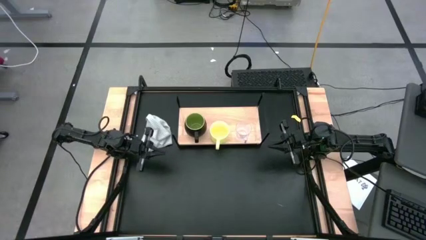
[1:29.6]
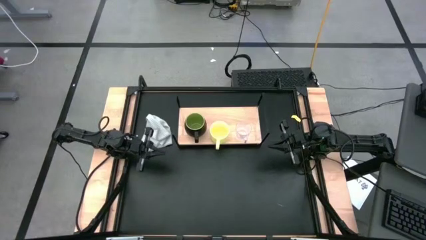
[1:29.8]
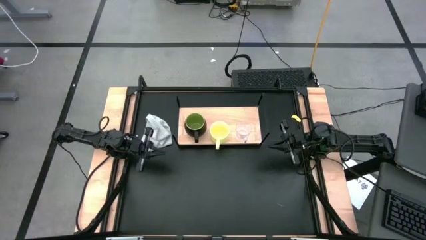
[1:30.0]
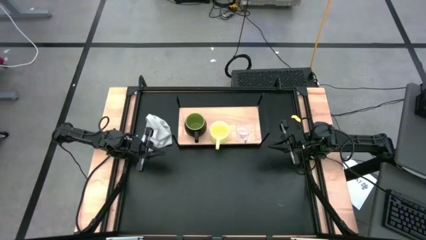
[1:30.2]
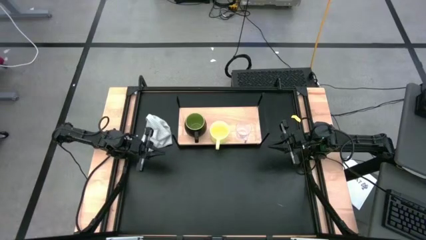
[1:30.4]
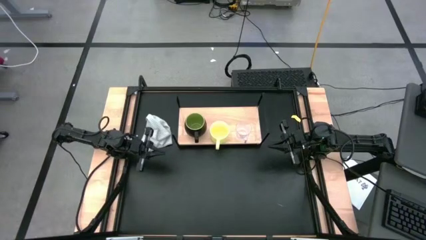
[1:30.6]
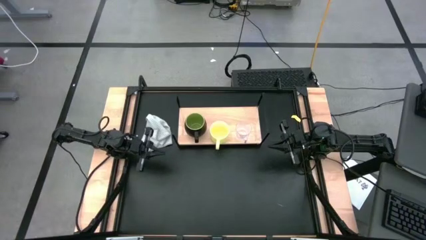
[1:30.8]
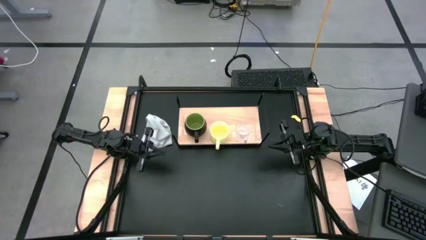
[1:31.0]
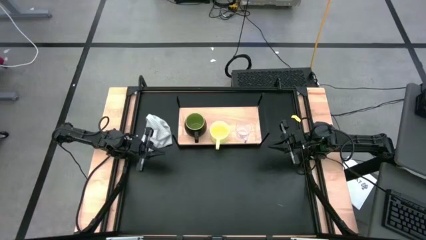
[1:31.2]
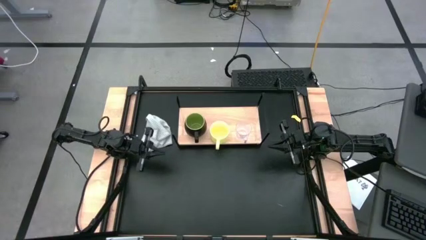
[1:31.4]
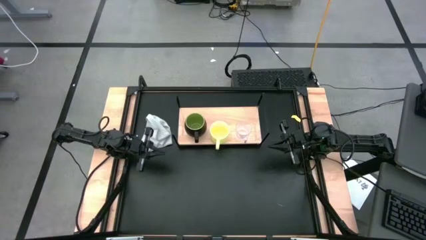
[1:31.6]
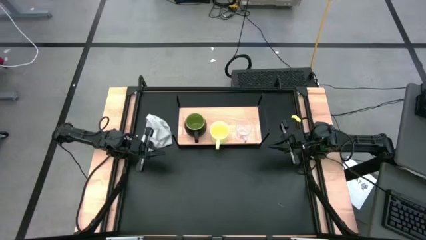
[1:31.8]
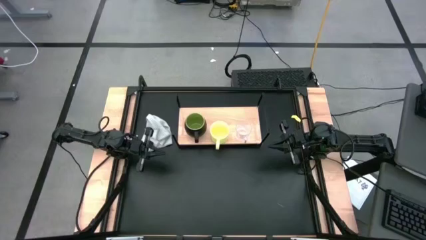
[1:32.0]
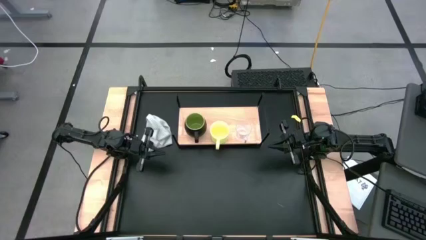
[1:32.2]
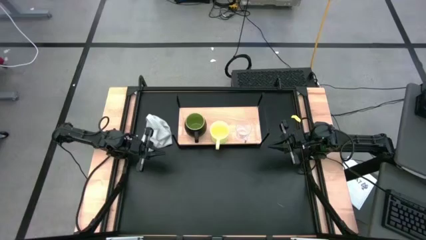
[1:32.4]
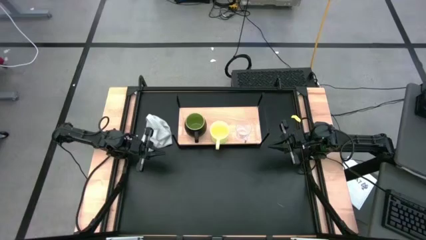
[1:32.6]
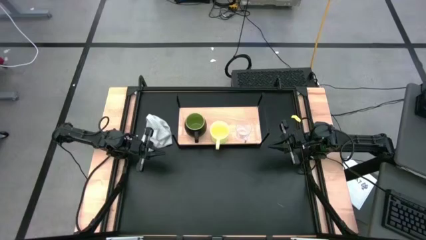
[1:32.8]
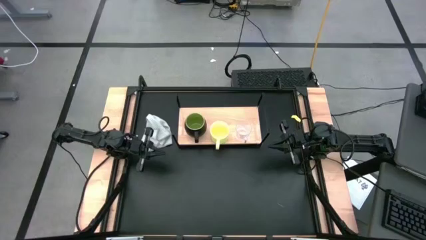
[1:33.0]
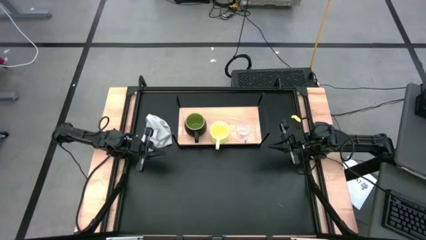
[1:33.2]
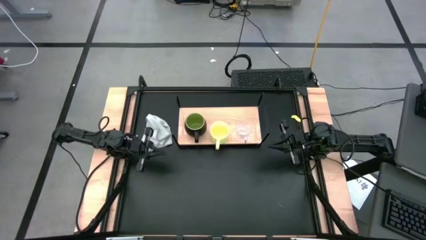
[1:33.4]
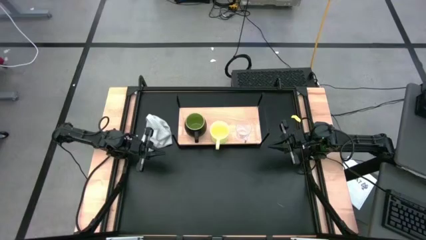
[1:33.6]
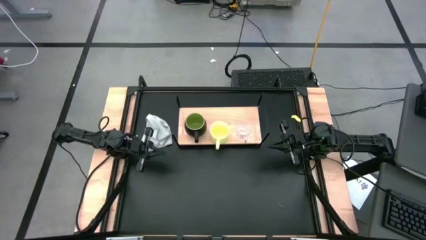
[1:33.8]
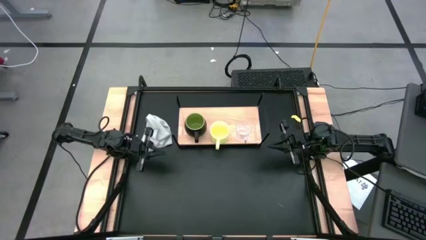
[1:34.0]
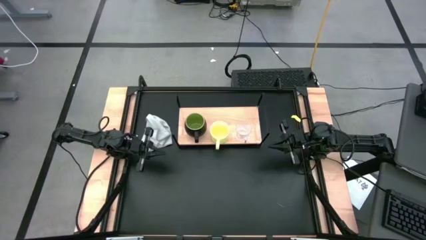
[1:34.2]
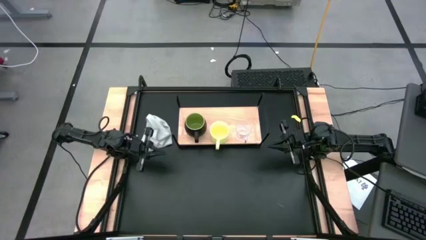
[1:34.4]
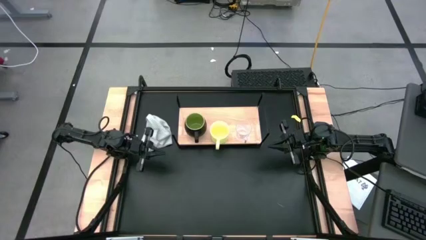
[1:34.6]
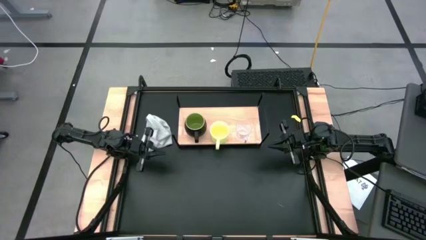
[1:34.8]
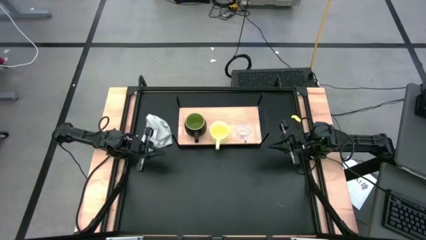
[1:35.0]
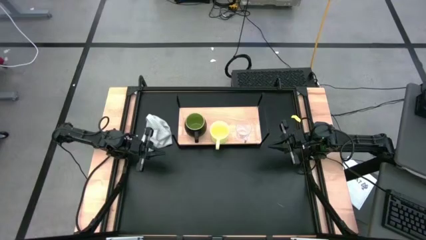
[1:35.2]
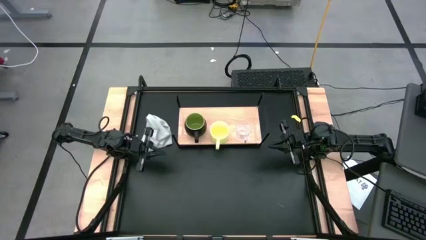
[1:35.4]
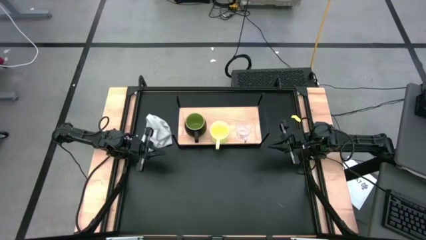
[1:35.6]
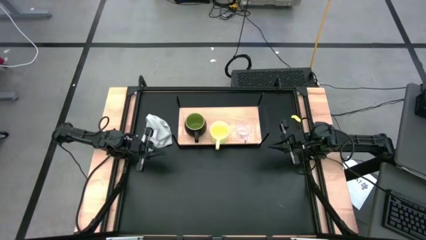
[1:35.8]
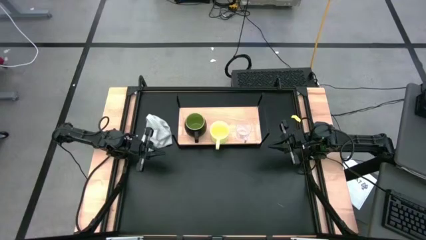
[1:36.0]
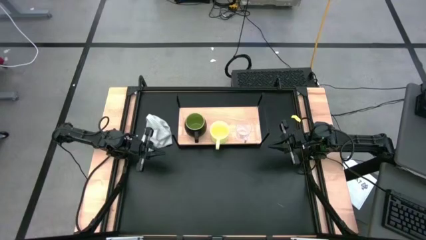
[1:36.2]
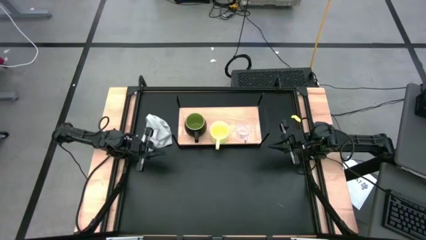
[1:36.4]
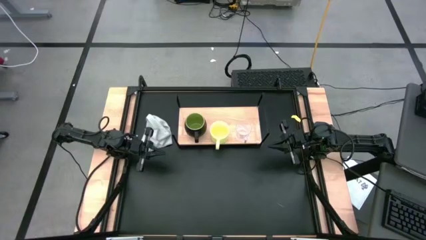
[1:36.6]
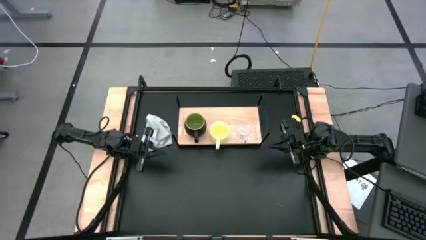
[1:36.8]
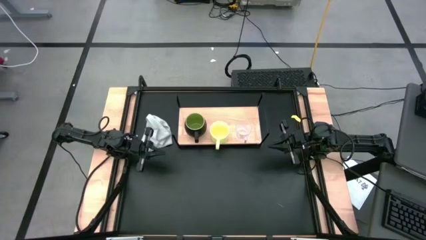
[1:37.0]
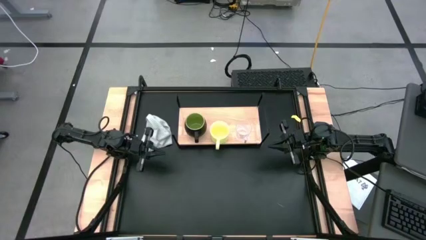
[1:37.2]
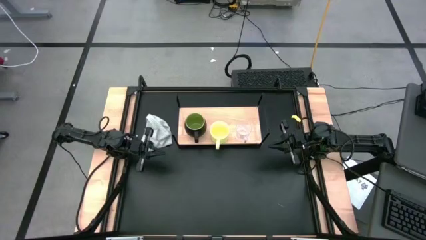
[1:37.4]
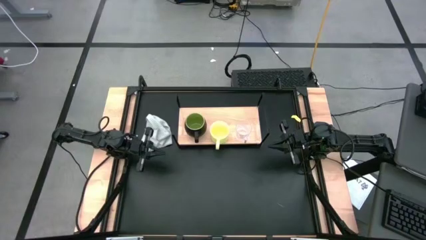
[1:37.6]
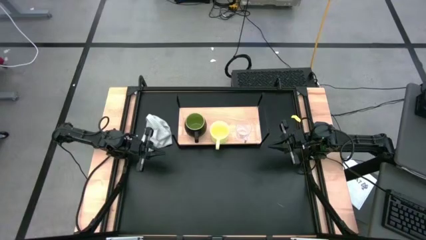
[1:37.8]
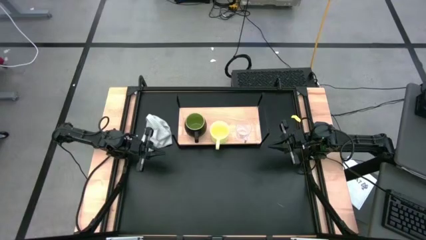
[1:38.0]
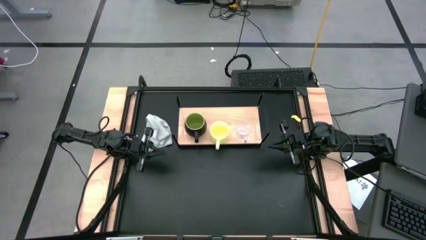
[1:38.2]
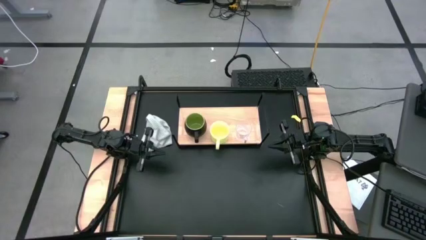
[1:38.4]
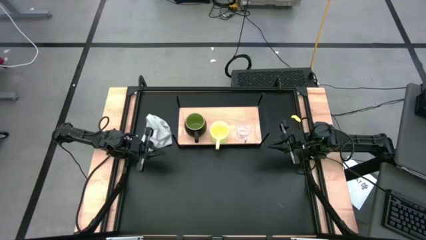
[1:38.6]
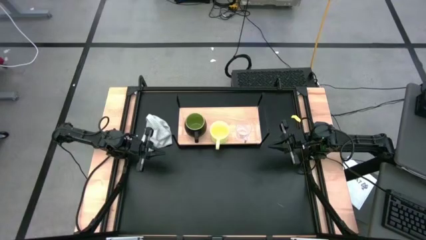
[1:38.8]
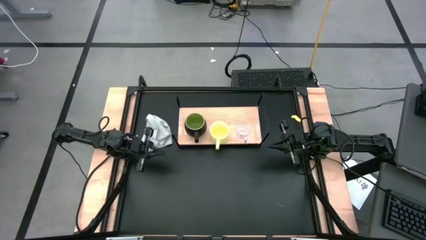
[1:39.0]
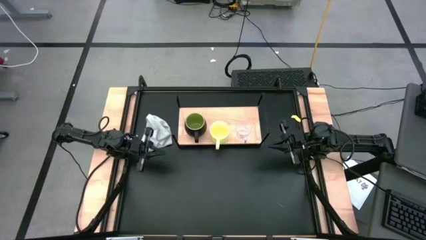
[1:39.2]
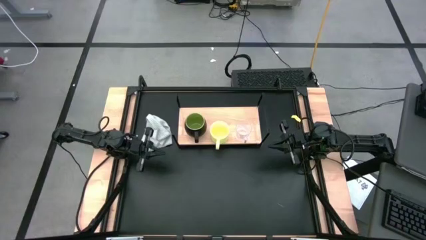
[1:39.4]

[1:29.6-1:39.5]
Task: Stack small to large cups/mugs on shelf
Return to Home Position

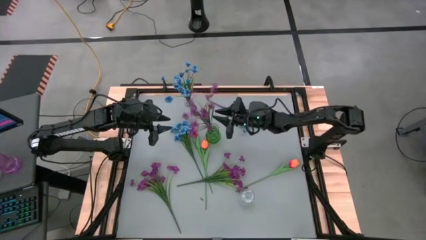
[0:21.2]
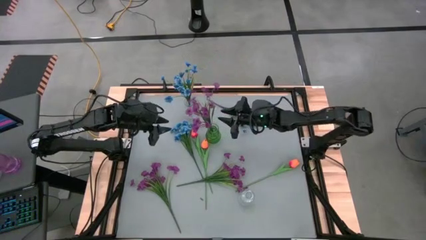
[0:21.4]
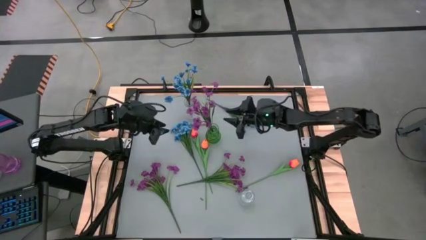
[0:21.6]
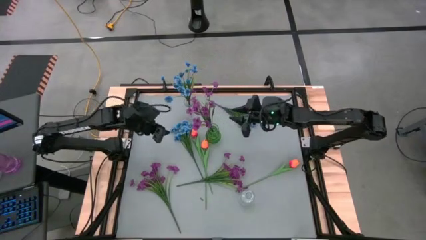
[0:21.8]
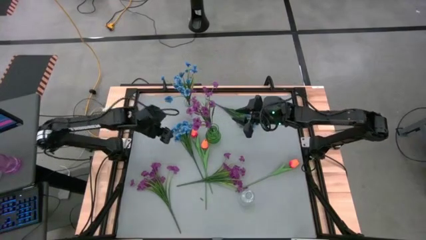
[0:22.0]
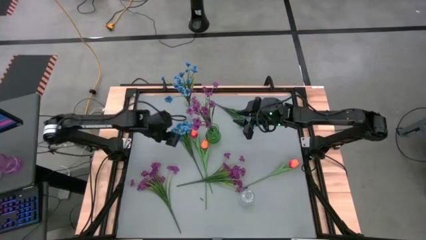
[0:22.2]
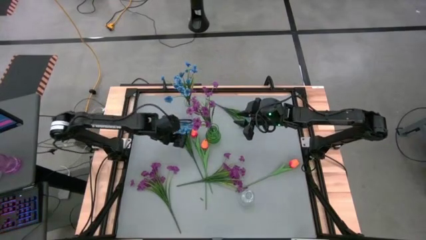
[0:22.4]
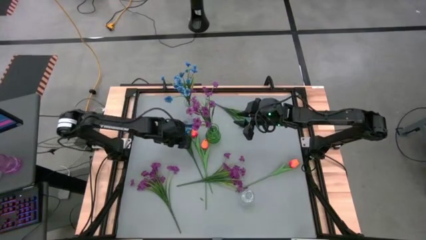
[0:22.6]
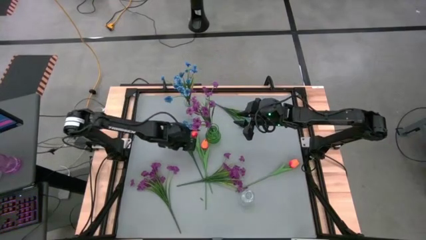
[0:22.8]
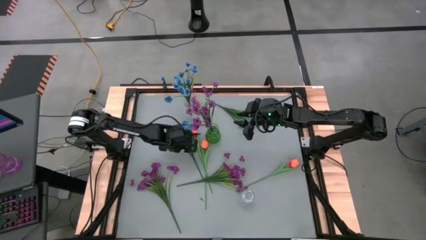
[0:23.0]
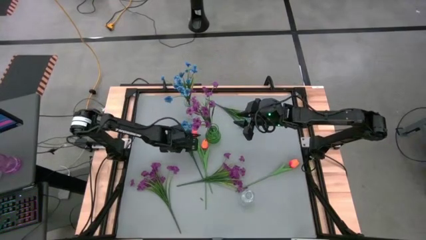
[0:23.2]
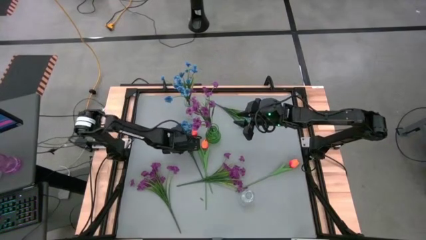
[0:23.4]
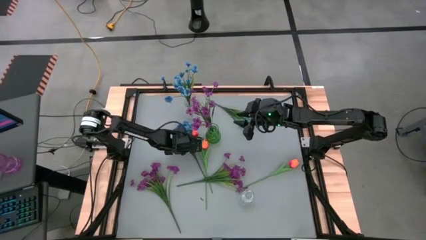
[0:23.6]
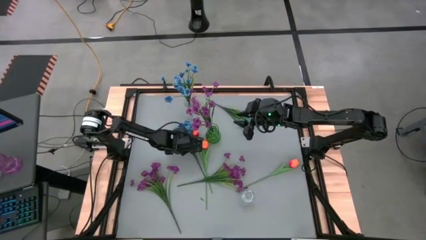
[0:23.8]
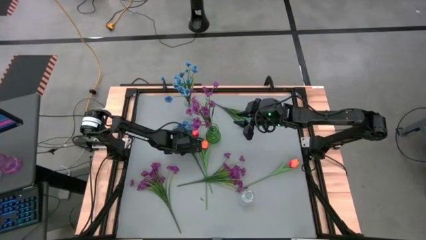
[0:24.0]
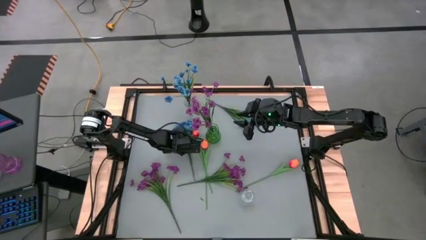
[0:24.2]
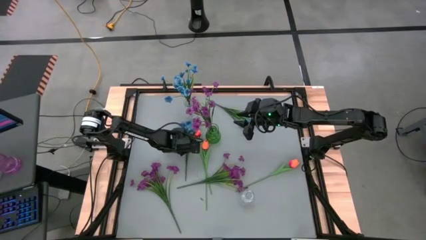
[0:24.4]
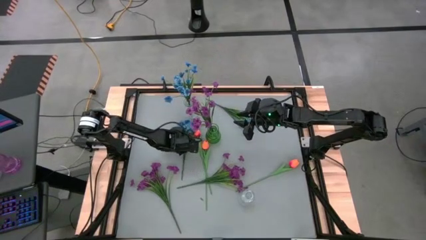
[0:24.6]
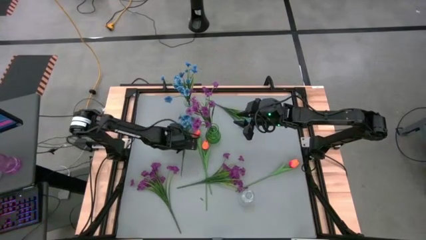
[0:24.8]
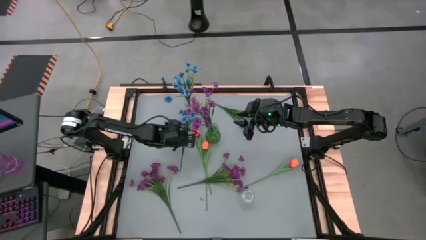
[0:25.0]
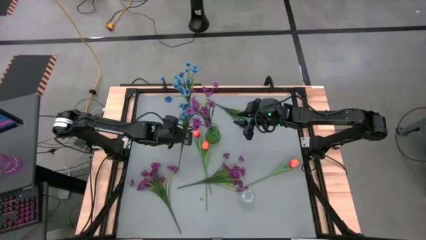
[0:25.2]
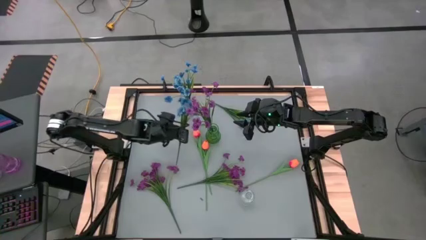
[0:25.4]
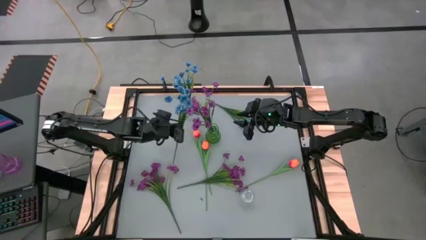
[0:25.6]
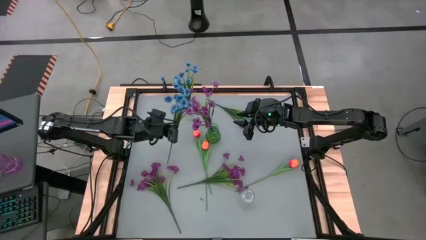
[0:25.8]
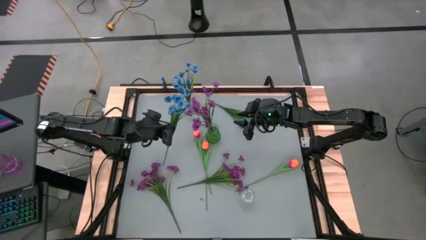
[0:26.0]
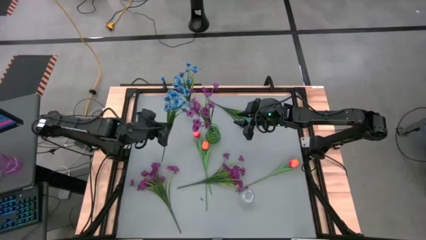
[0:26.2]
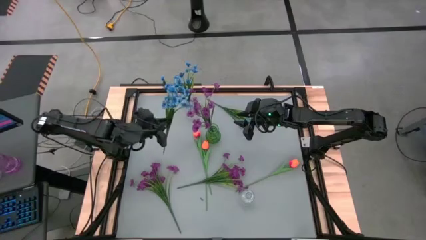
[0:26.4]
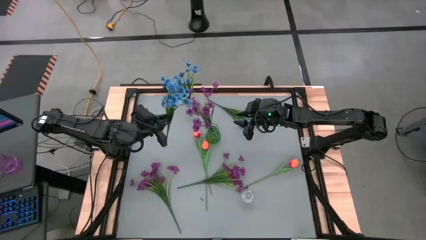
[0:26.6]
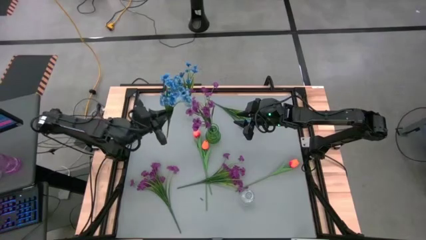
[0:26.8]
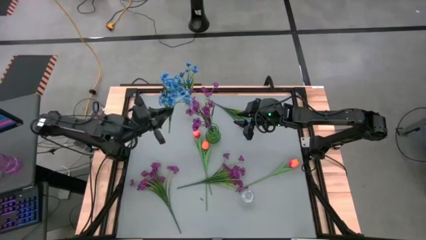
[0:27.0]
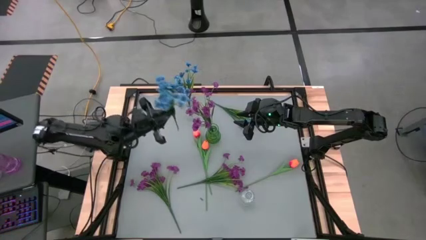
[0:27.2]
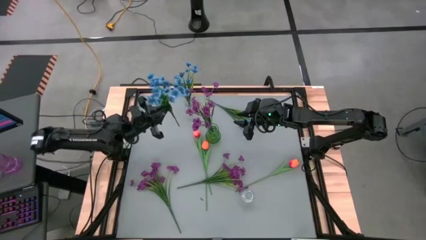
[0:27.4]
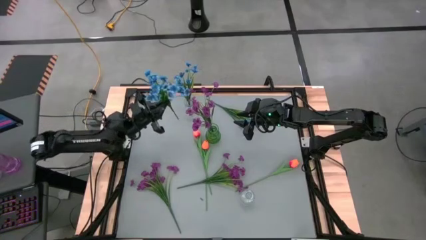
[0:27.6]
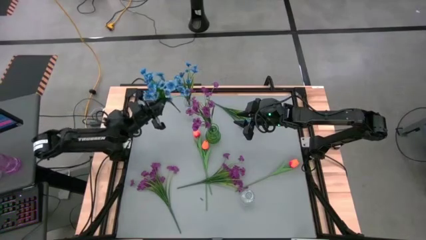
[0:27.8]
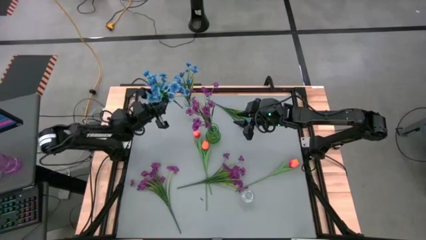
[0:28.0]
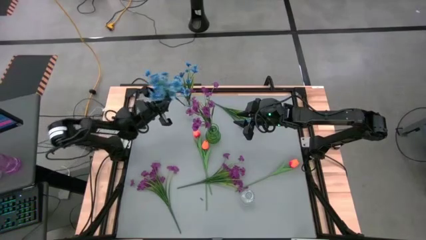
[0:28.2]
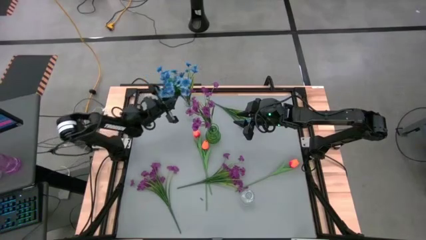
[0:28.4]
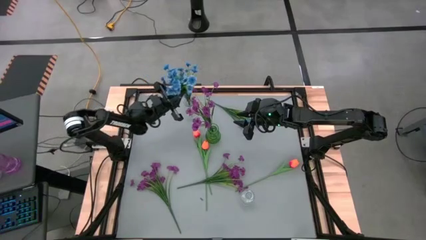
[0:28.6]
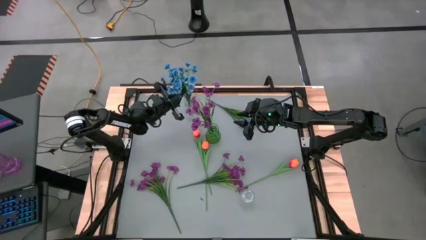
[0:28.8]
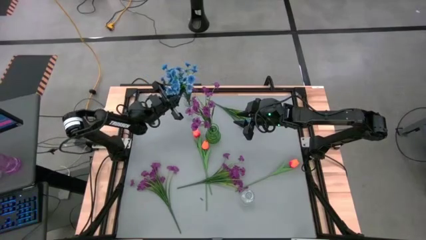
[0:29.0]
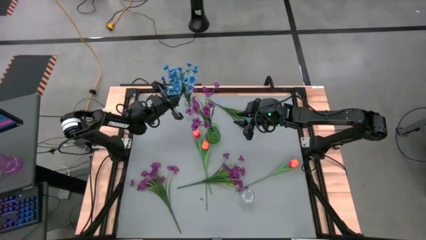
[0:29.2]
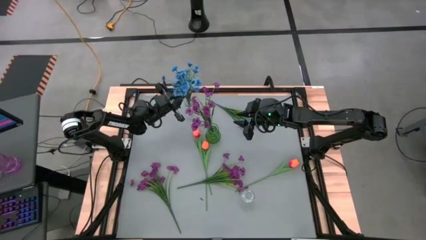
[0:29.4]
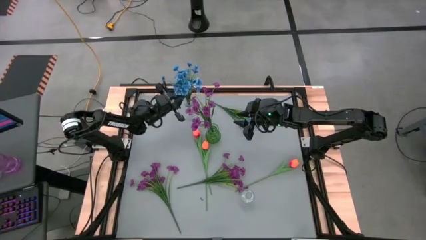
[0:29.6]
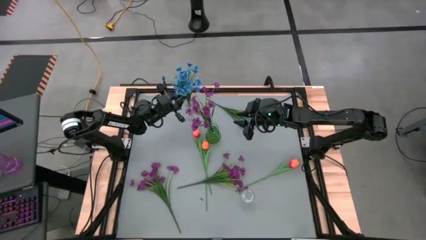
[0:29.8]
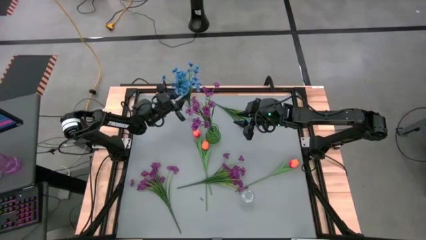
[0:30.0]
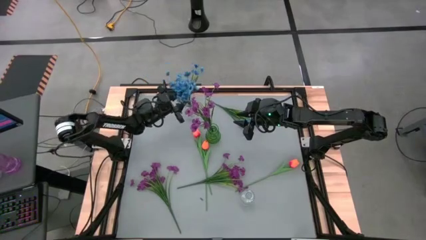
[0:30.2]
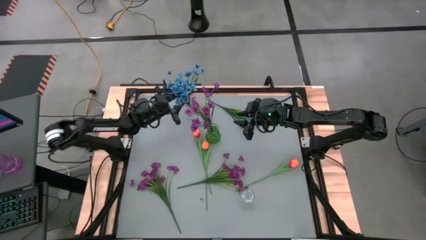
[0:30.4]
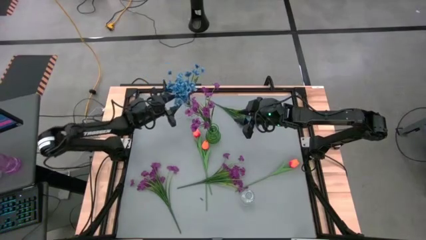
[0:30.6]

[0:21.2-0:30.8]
Task: Sort flowers into vase by color
Put the bottom blue flowers into the top transparent vase
